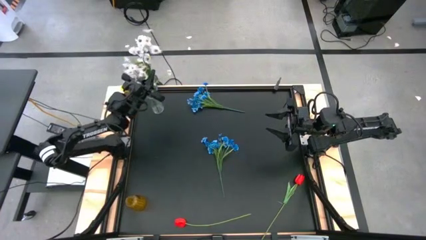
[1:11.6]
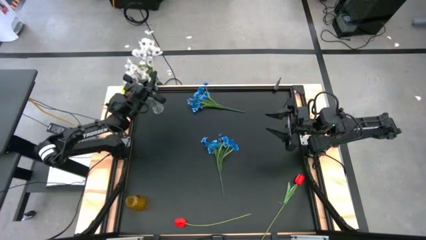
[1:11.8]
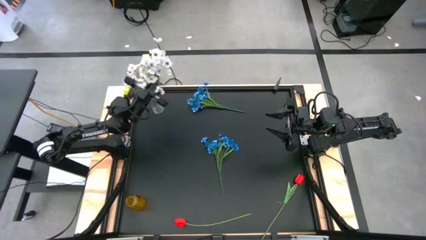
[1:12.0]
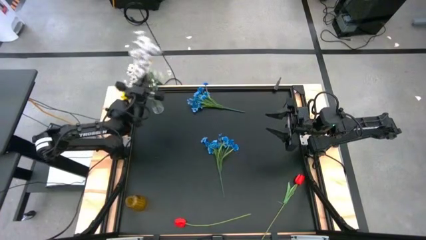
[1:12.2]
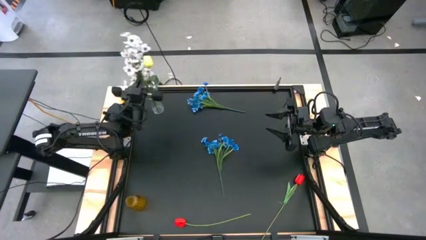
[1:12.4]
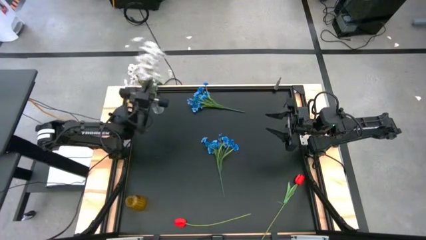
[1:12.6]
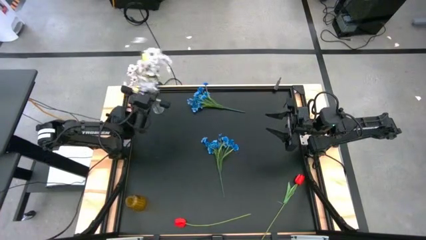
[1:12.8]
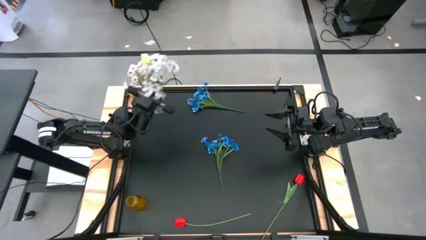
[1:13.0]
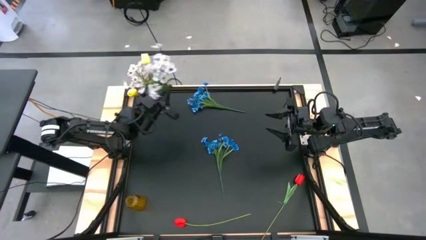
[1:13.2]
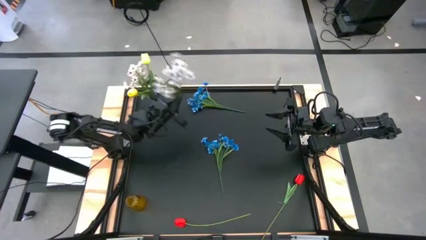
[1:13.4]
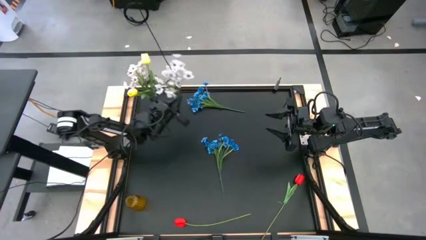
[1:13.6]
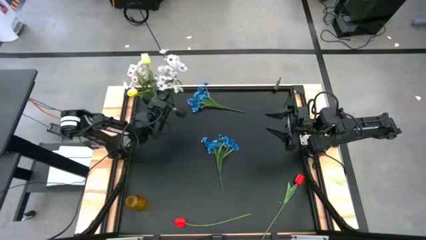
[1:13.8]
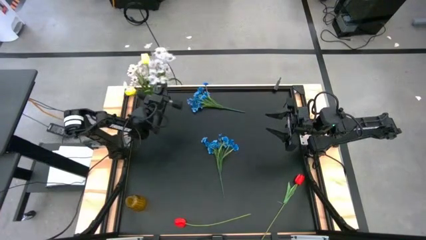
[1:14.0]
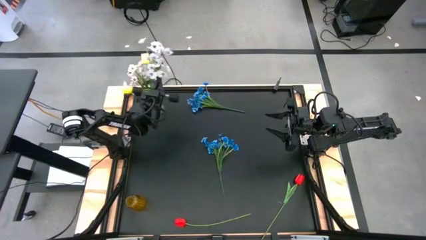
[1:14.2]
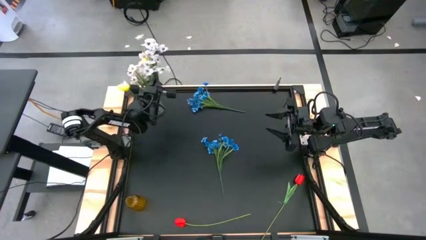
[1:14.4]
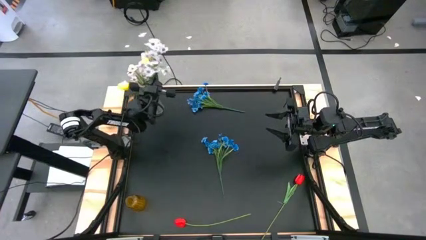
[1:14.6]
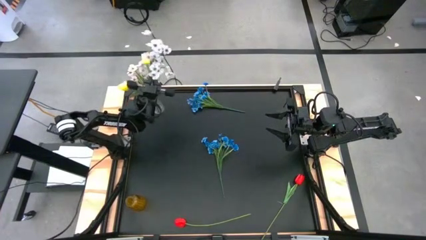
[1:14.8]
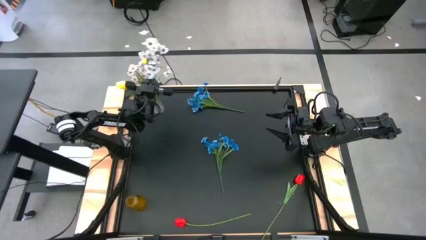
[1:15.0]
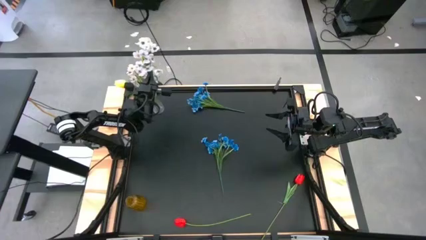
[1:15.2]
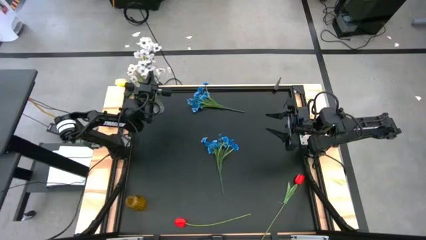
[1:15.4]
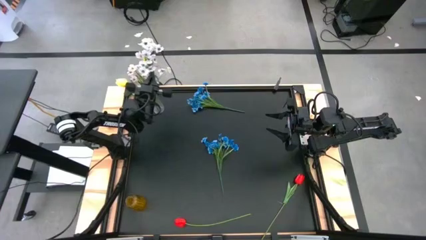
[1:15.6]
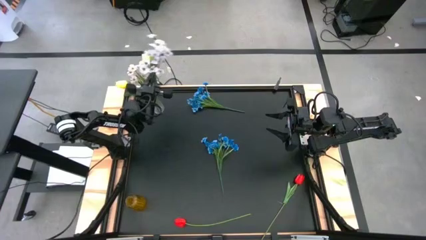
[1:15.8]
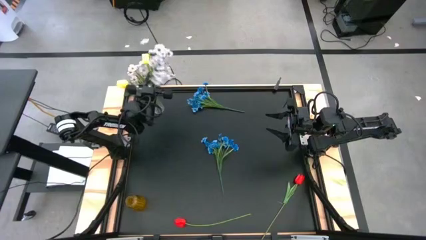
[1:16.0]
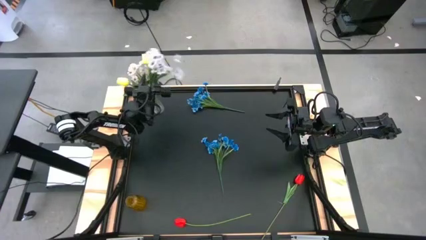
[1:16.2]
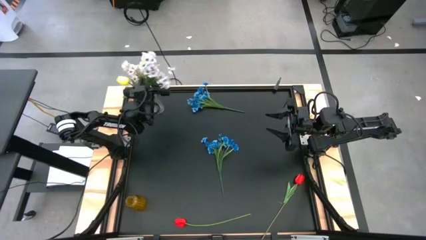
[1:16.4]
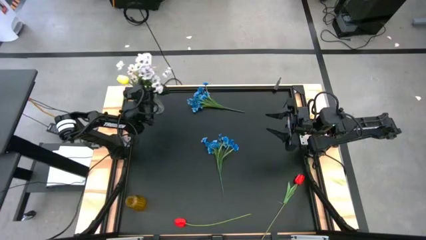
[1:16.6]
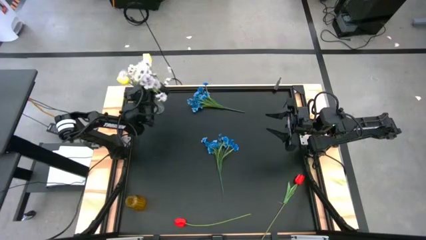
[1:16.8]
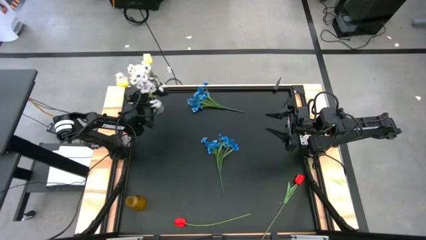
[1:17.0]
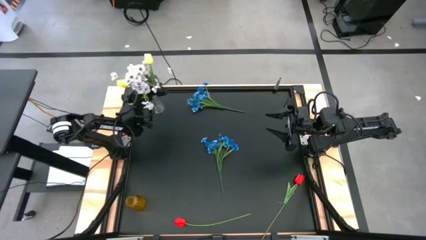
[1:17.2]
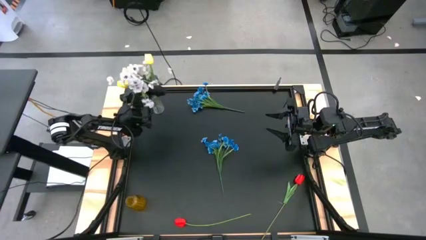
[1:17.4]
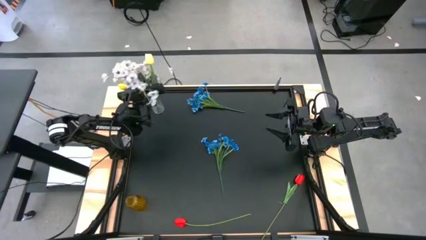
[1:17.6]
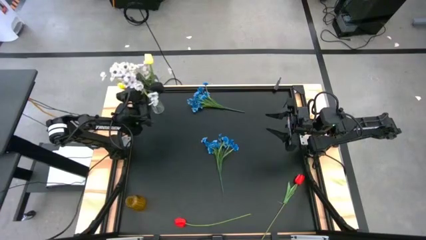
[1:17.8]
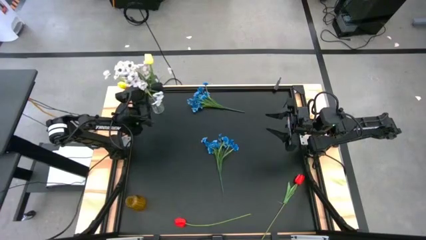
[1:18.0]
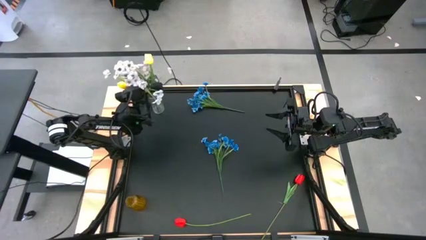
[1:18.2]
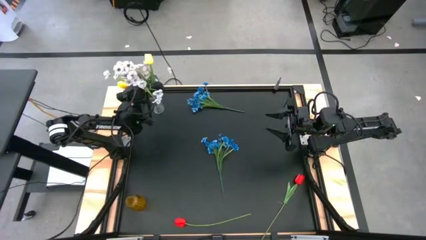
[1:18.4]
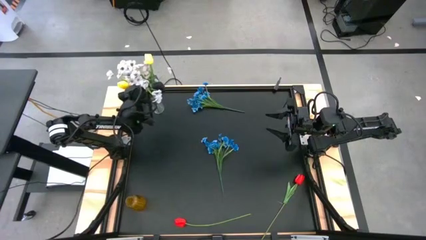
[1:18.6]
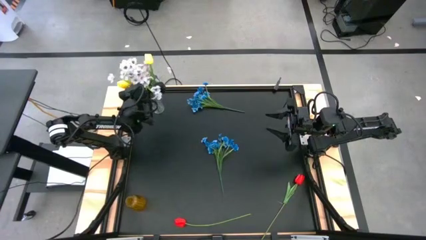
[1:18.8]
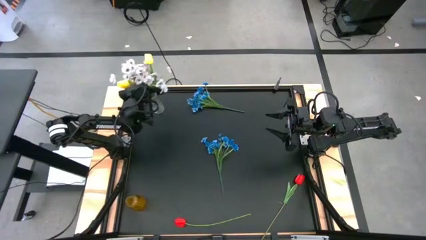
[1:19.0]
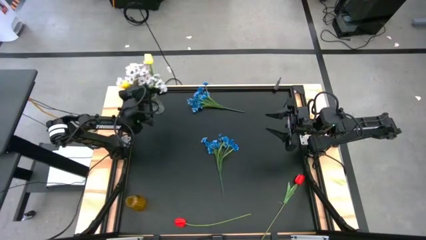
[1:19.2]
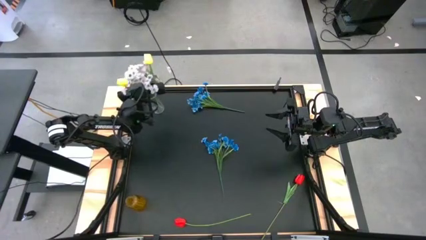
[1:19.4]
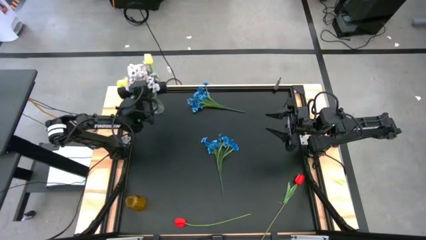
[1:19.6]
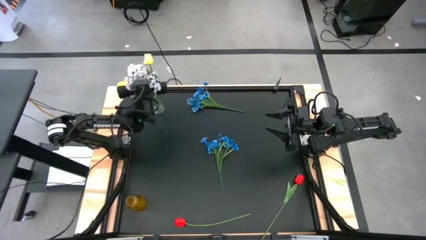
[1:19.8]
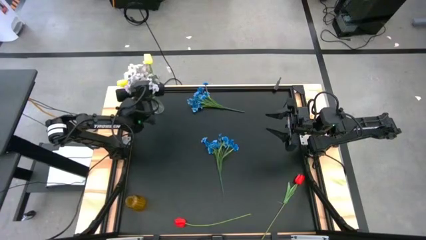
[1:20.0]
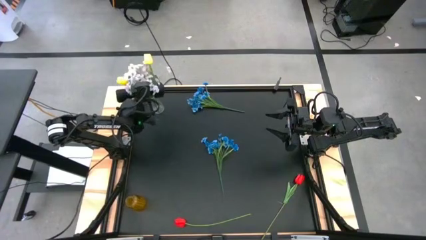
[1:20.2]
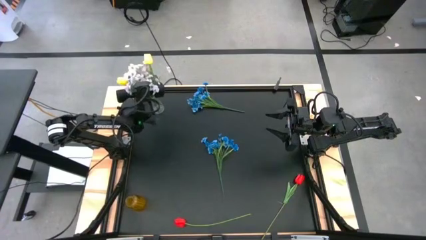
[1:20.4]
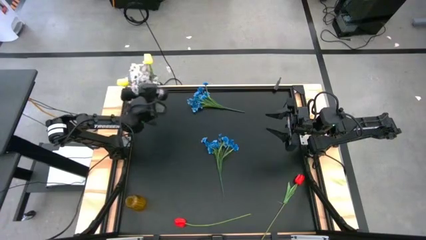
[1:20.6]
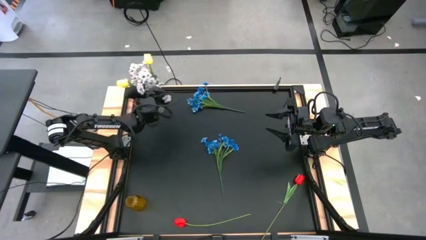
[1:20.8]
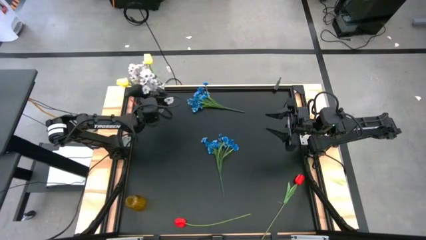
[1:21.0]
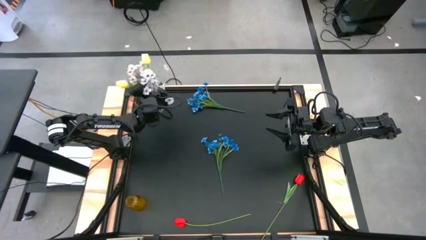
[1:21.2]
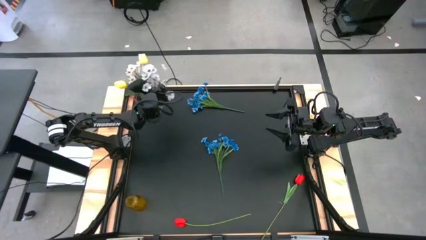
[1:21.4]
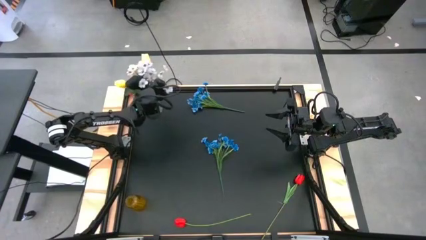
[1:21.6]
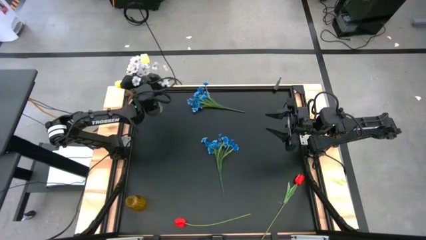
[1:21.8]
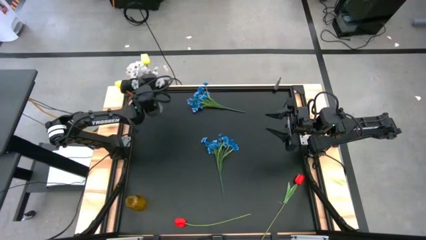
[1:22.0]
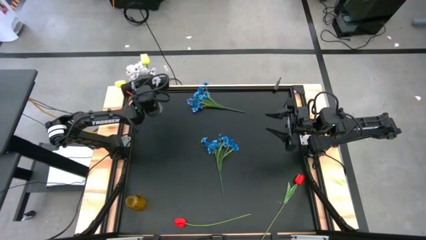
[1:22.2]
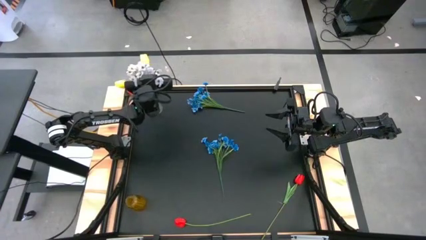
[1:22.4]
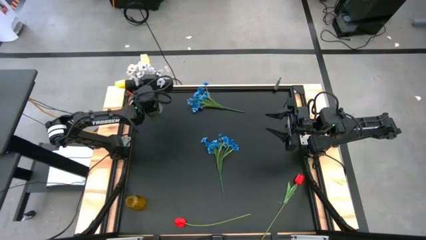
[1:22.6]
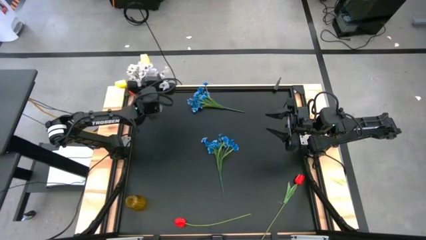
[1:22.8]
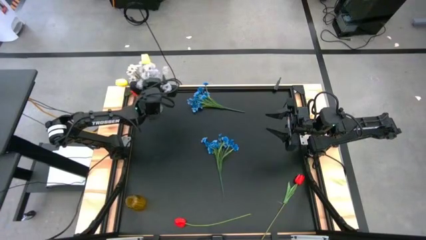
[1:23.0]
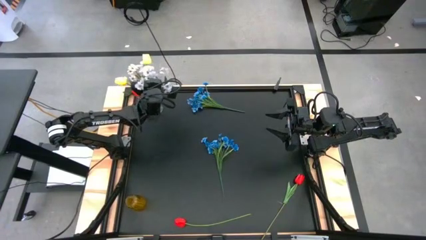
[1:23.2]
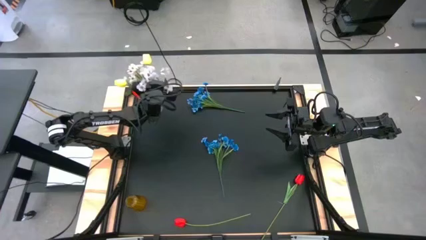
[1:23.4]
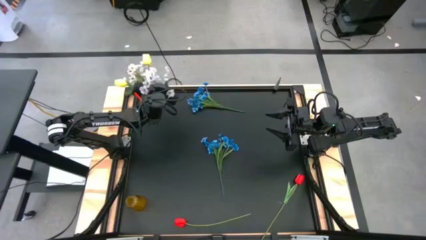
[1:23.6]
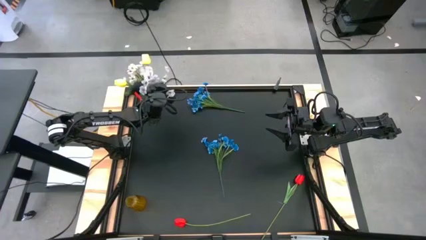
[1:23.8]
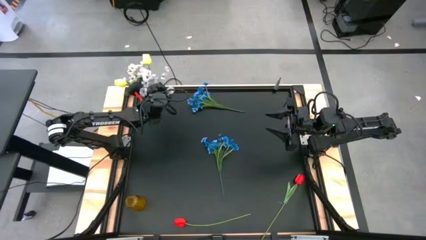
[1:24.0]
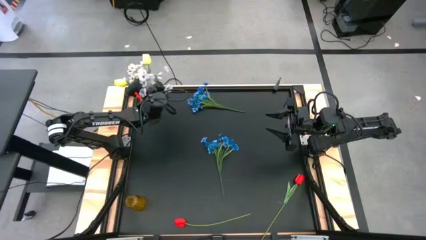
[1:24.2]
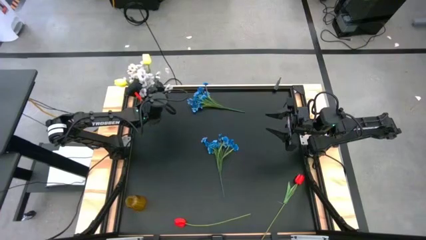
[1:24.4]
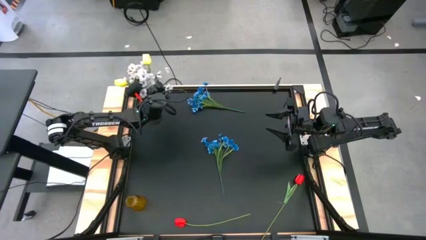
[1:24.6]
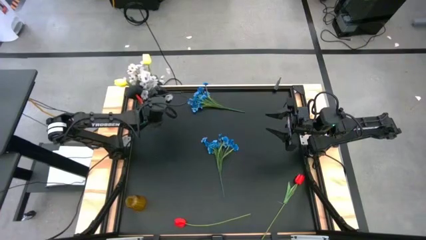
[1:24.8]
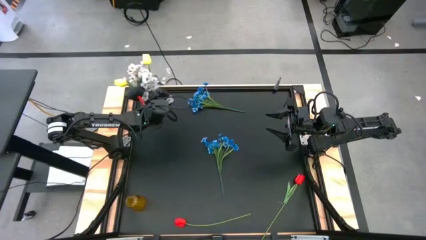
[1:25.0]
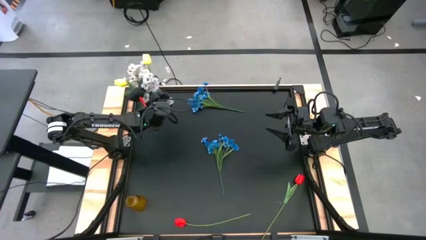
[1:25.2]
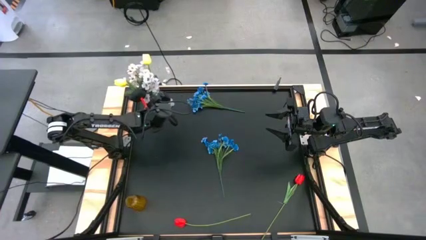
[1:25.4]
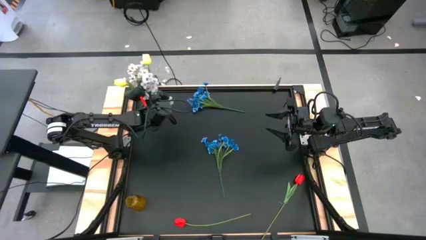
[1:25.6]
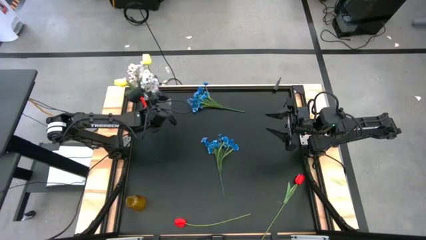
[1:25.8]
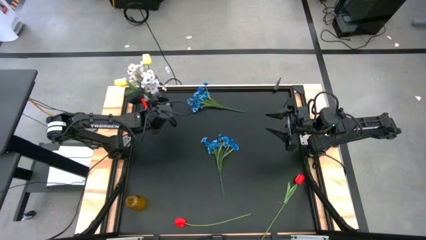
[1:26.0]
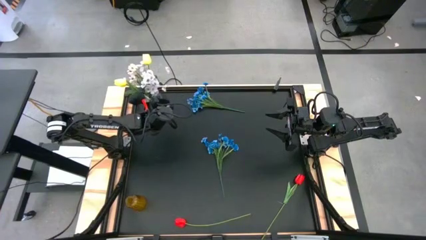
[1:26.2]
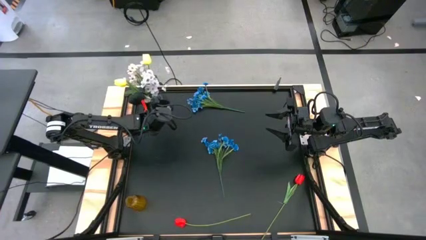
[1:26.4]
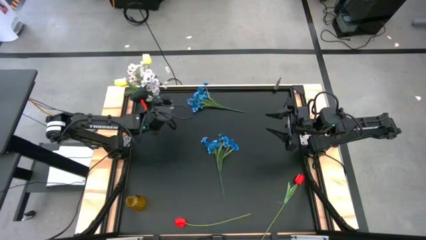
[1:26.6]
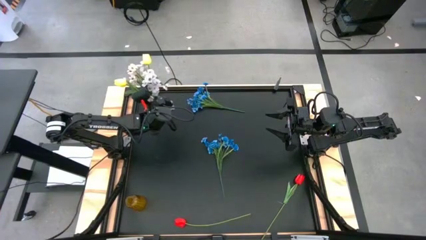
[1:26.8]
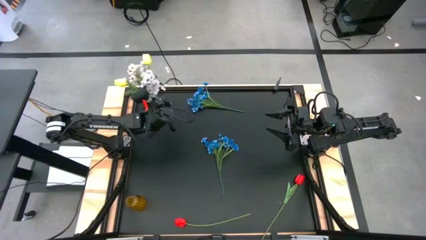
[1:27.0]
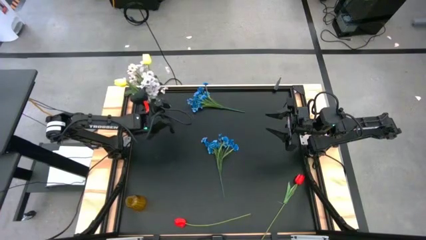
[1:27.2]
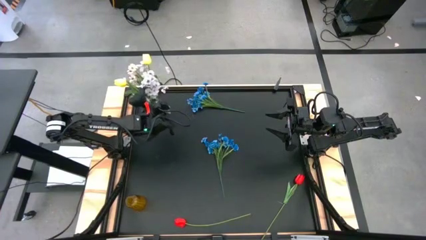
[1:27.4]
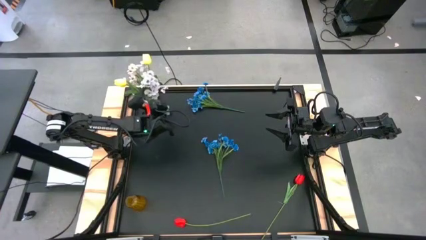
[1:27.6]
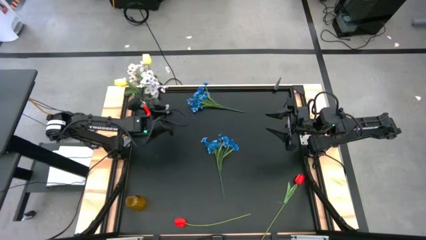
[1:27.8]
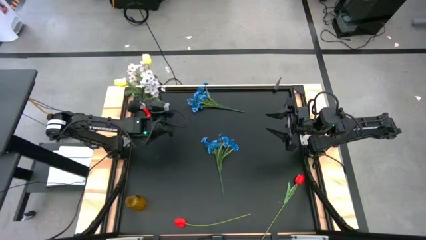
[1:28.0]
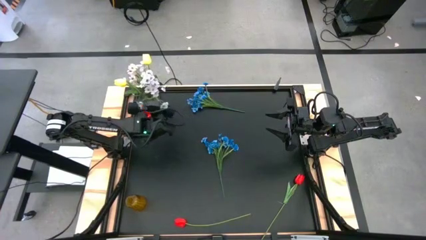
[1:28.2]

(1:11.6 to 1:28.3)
Task: Sort flowers into vase by color
Put the white flowers into the transparent vase
